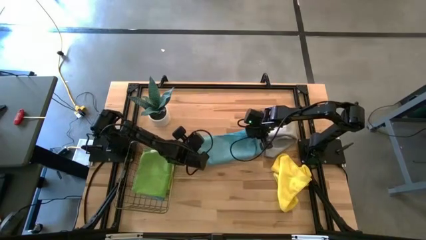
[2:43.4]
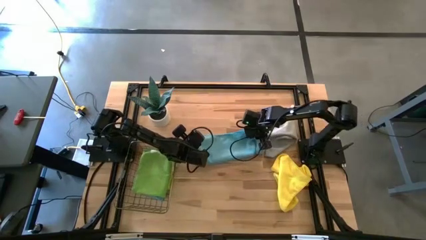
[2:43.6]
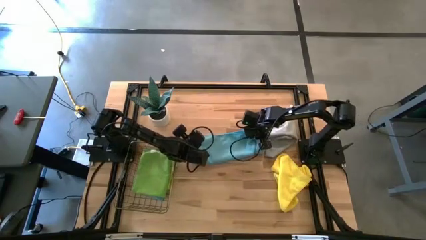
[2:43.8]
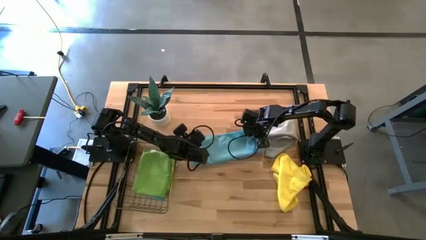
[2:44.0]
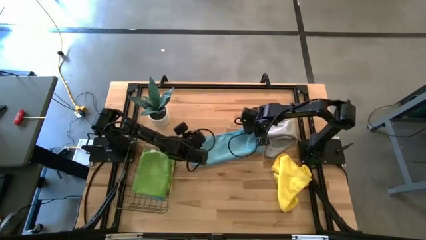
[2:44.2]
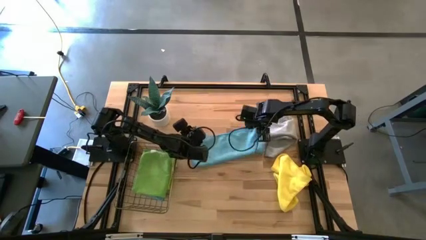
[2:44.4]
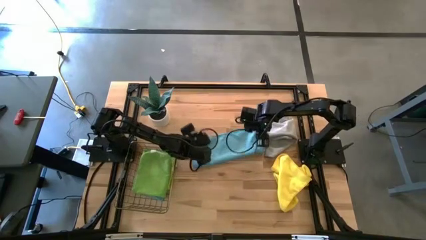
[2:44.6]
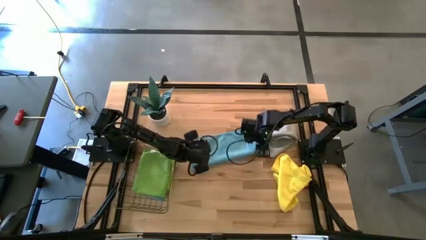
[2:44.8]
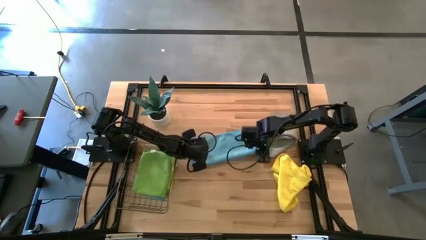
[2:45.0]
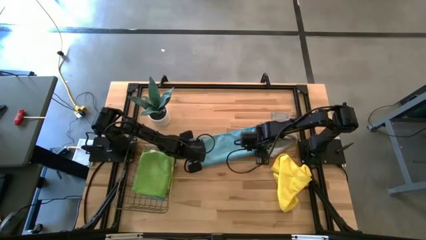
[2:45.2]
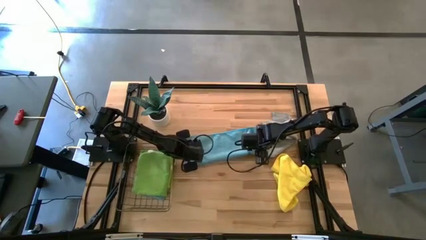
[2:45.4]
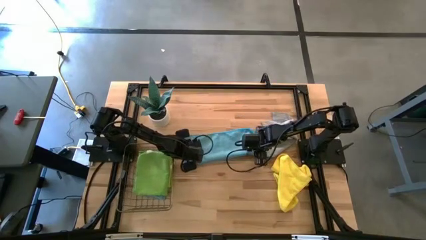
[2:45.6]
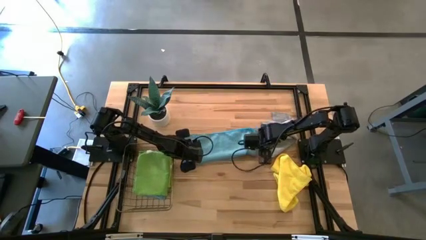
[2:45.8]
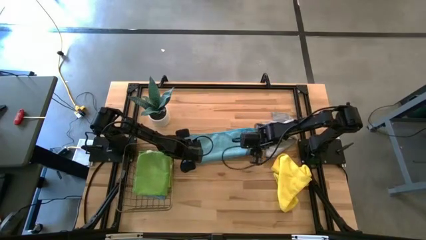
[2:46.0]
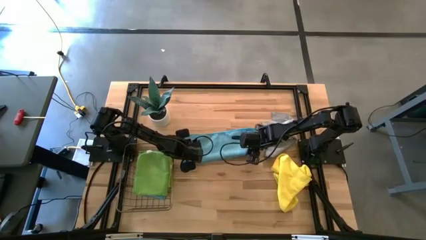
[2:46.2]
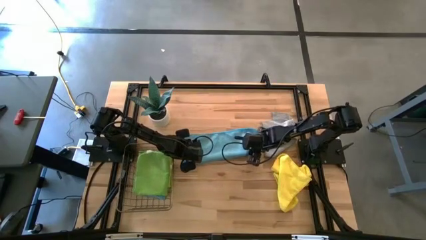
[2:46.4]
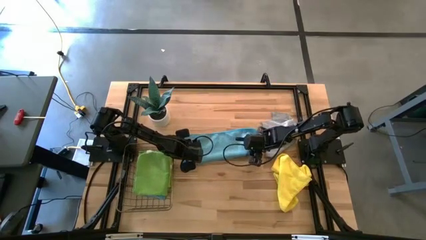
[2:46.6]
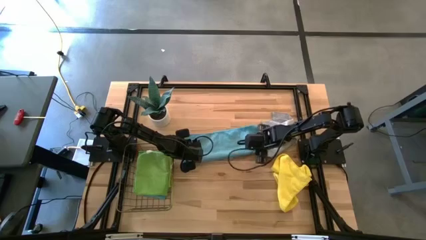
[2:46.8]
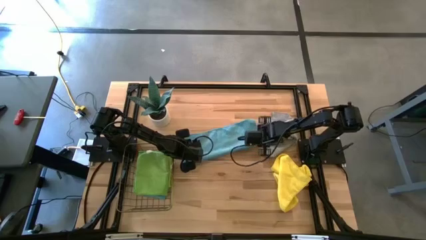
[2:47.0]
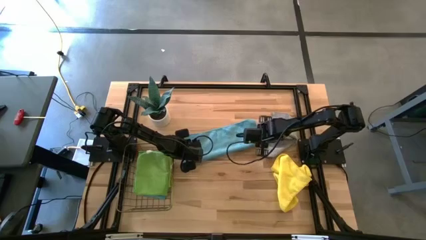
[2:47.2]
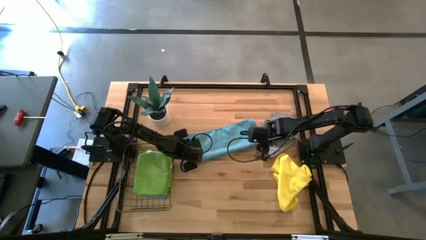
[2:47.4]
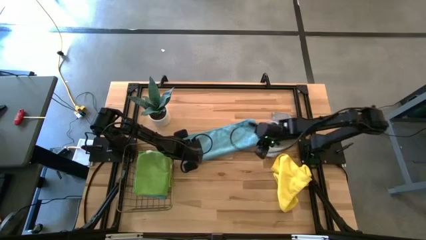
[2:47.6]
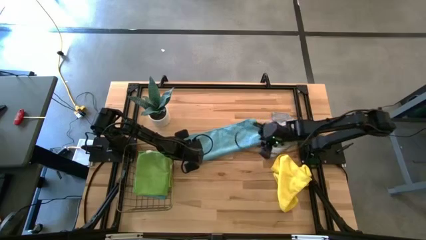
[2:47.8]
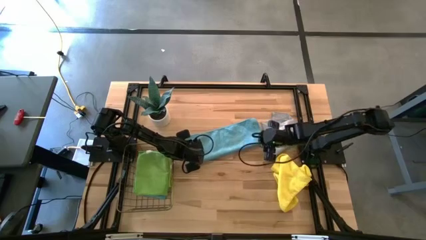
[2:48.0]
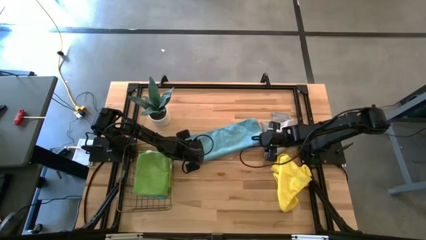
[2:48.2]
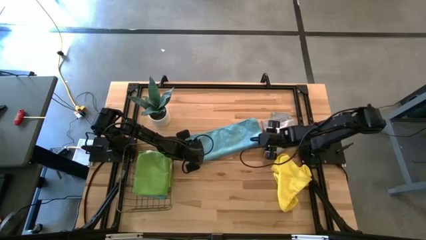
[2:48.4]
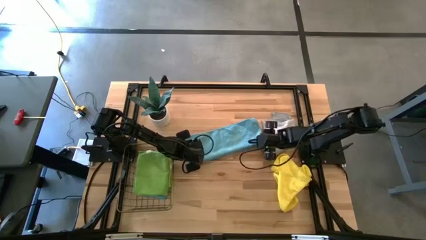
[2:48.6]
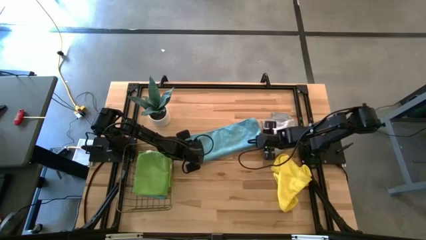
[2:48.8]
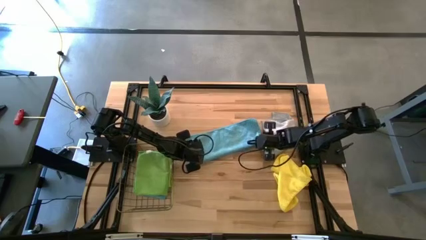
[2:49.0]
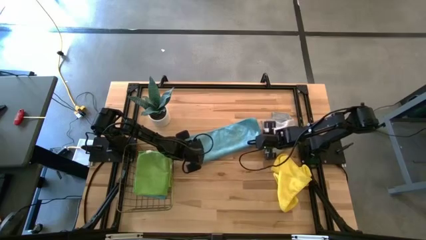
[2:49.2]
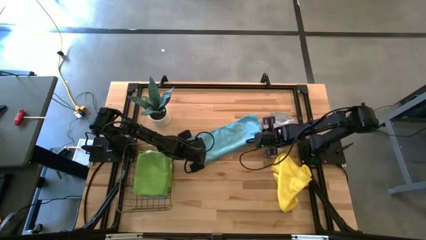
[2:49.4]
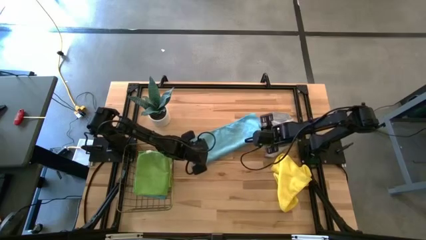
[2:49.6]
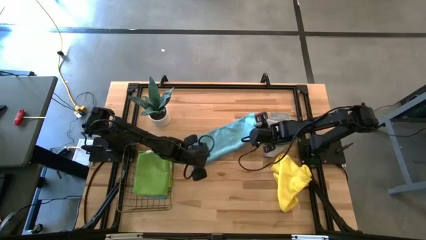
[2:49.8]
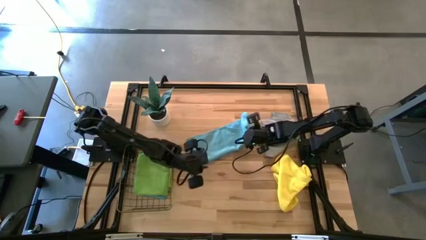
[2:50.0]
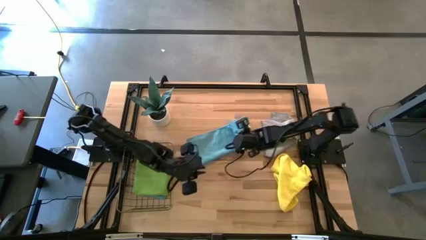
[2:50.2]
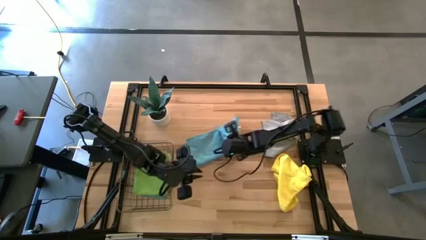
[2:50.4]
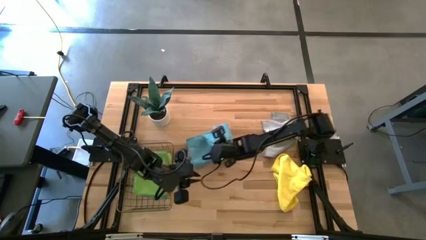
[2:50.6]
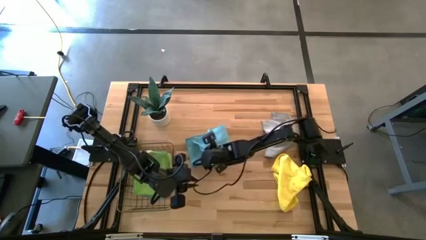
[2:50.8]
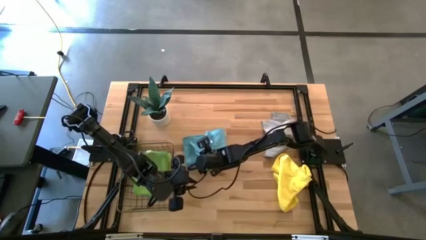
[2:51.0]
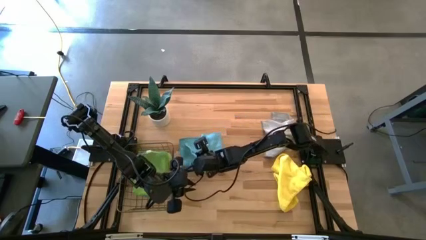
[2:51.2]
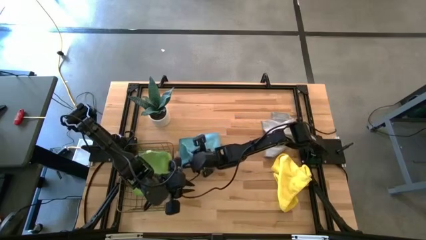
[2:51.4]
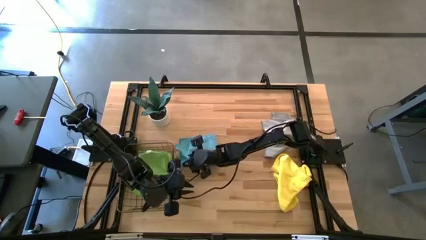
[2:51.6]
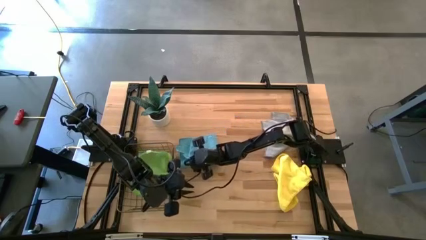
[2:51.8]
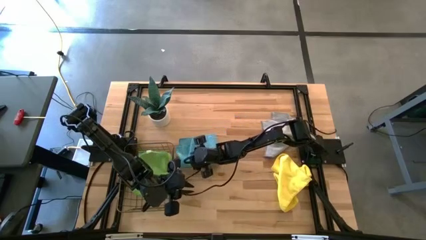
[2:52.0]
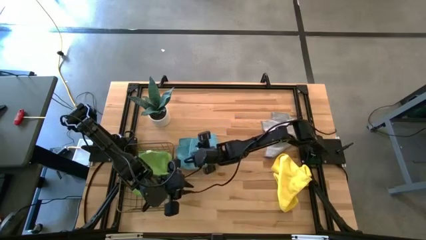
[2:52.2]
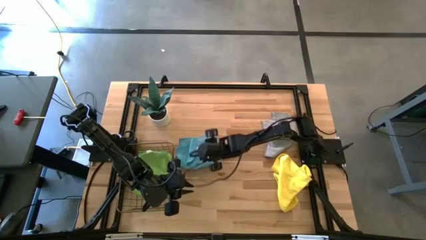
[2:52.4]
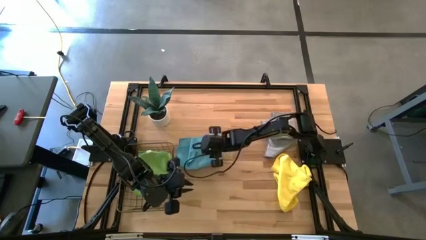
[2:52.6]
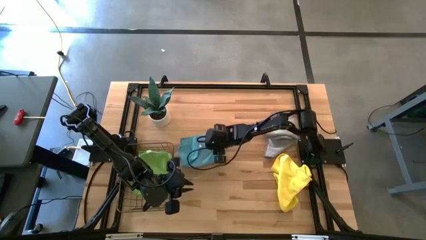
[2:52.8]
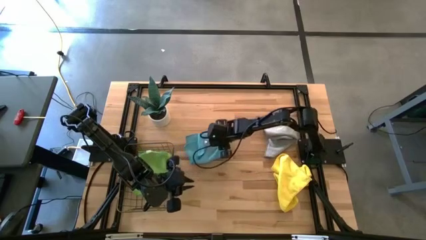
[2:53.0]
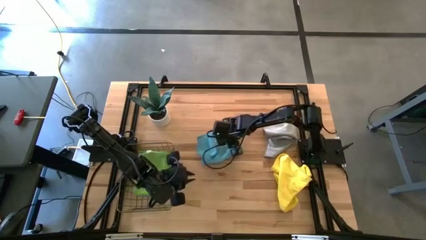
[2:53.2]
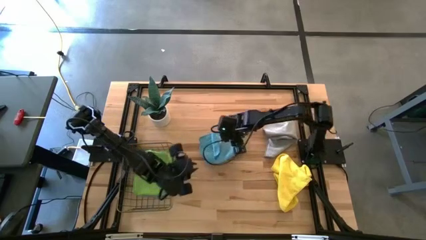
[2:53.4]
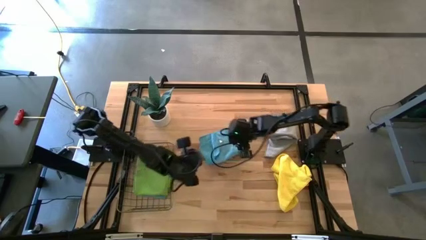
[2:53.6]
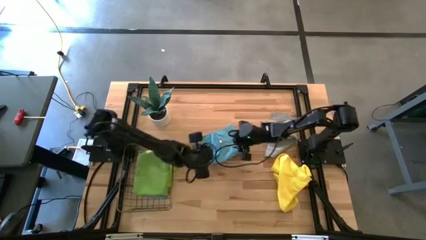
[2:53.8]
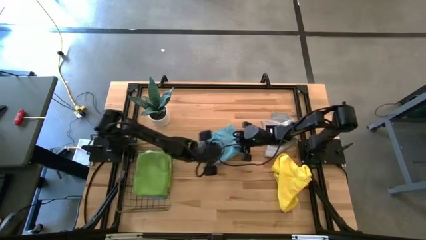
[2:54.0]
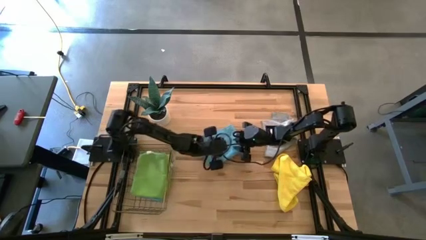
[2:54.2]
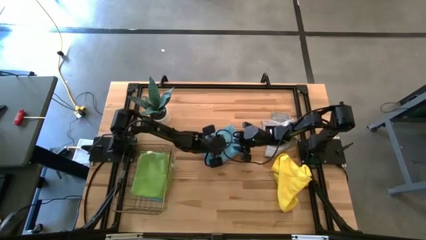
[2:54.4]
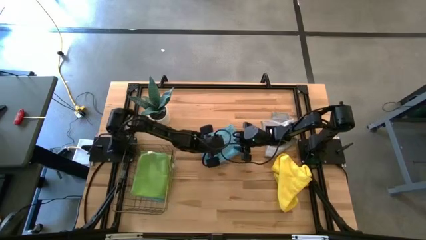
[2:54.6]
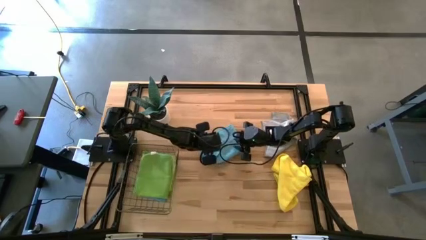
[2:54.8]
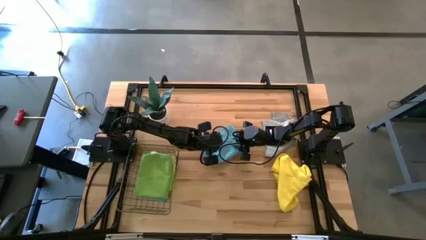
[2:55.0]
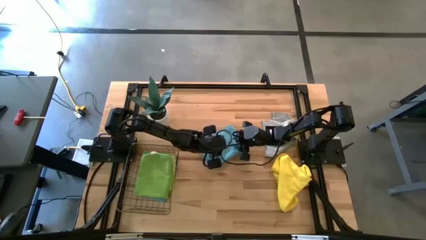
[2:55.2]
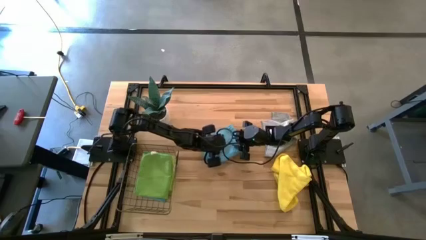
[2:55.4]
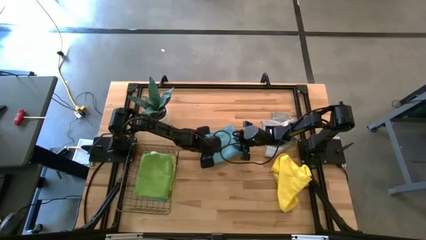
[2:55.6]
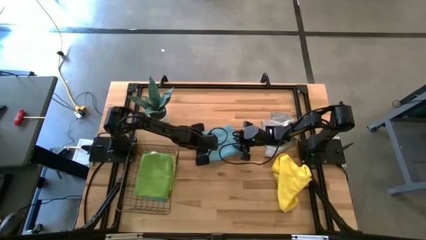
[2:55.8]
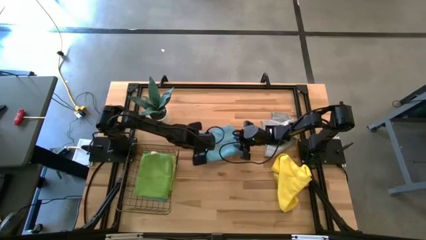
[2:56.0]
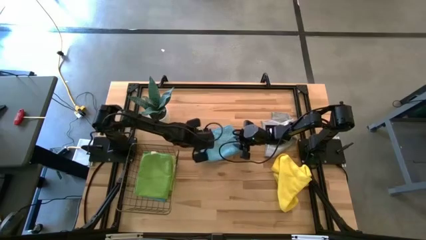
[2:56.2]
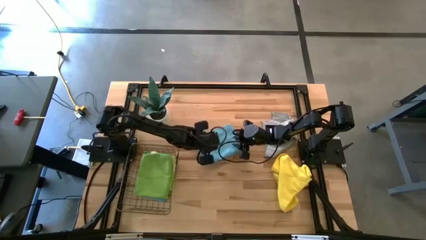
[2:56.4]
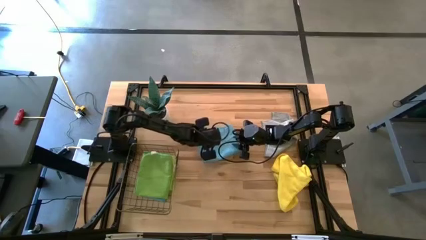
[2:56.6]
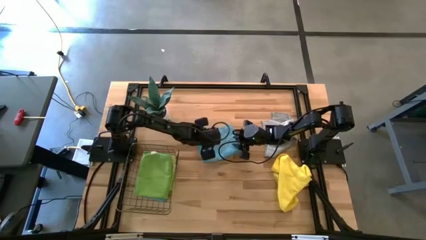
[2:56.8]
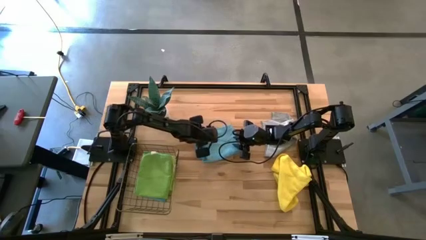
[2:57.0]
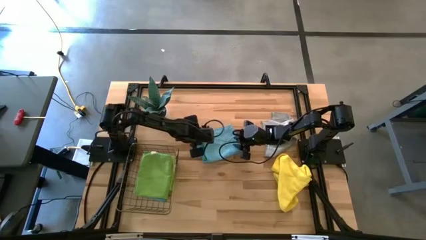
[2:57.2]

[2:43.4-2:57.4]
Task: Fold microfiber towels
Fold the blue microfiber towel
